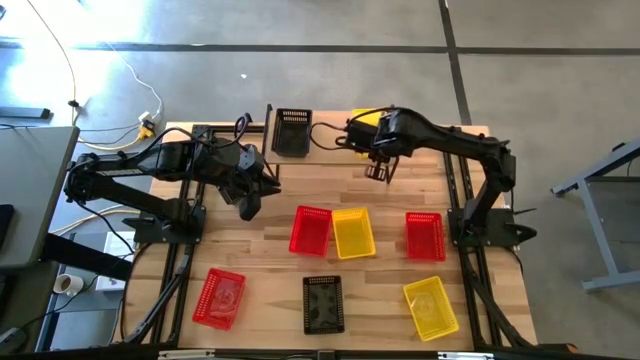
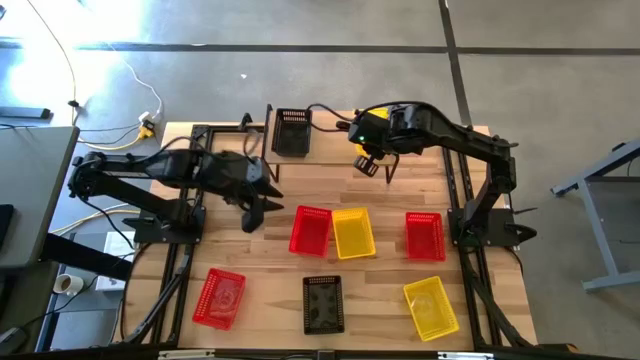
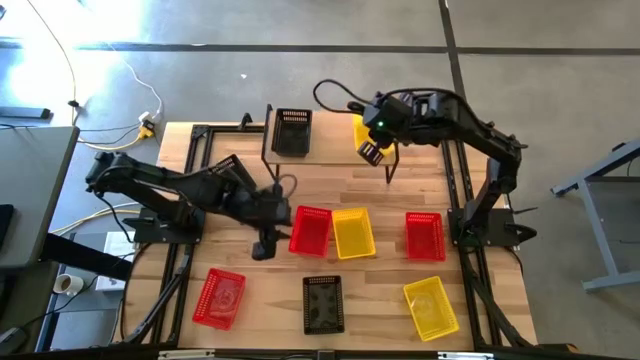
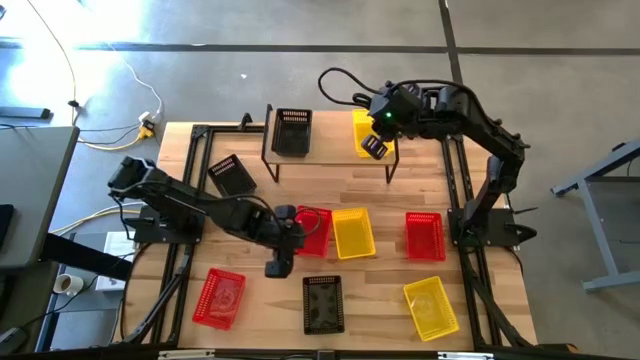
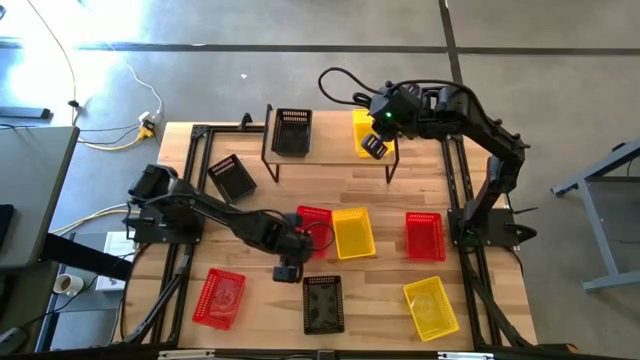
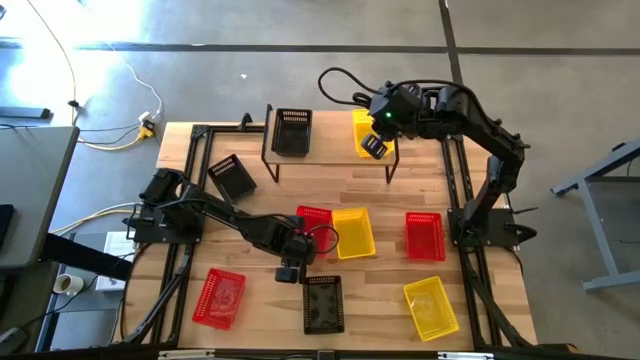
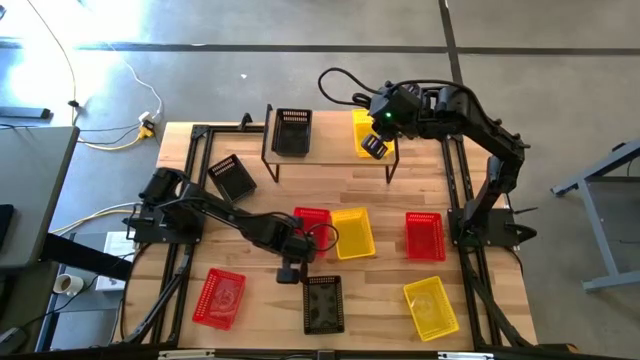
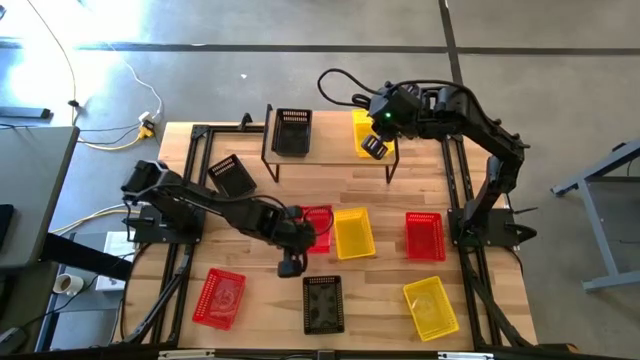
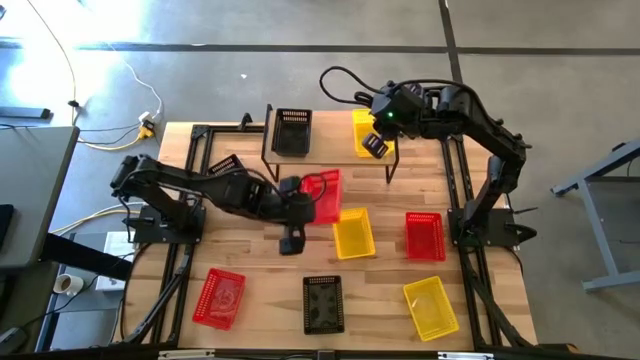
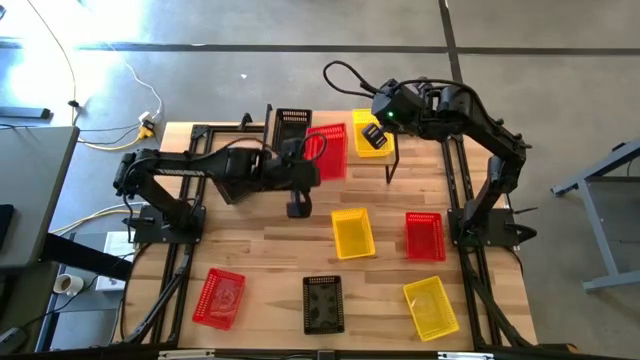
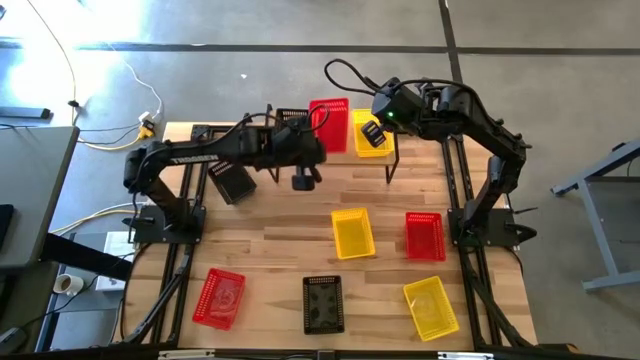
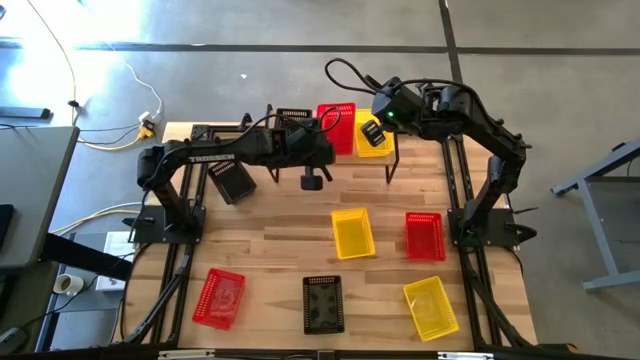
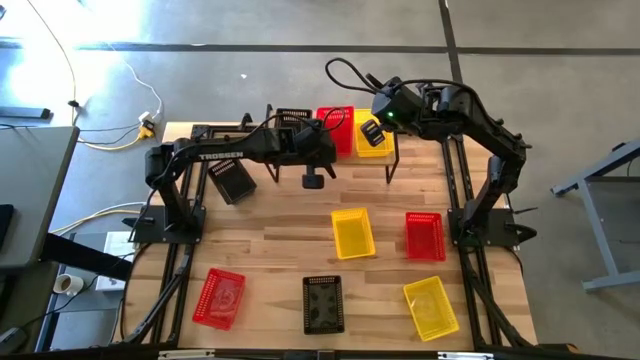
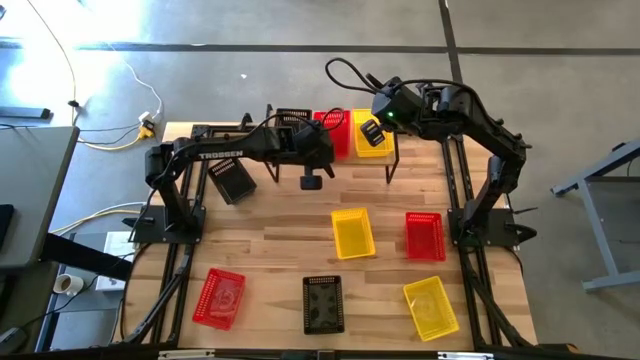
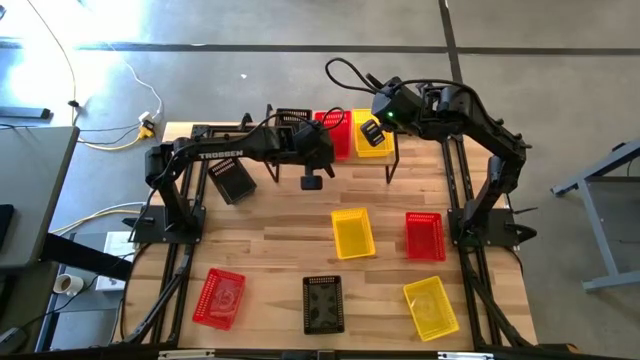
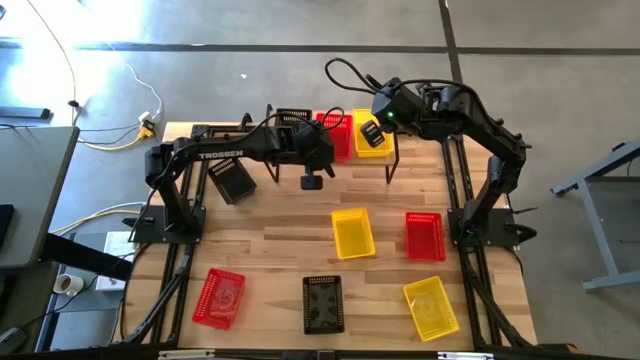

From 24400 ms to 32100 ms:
Task: Stack baskets on shelf by color
Put the middle red basket on the shelf

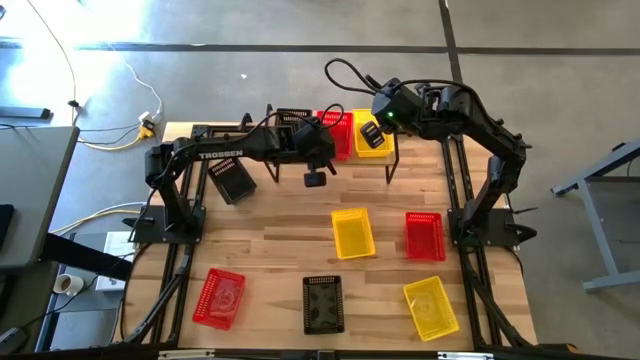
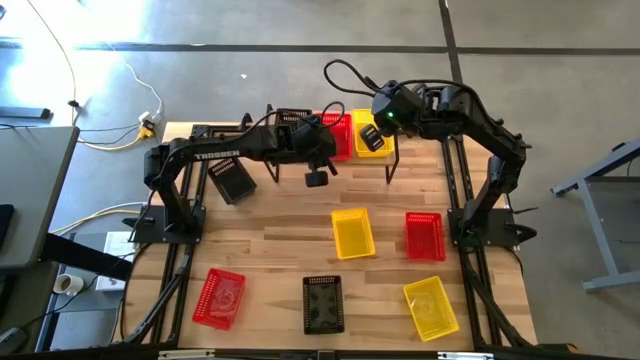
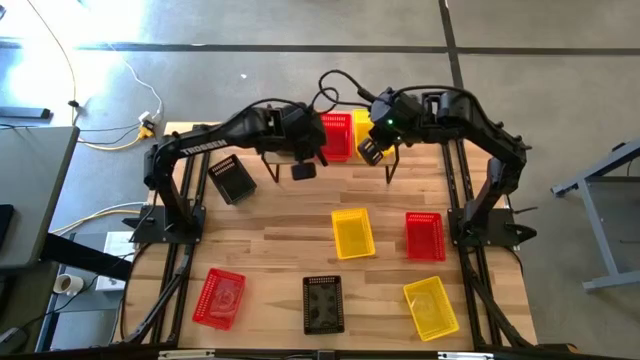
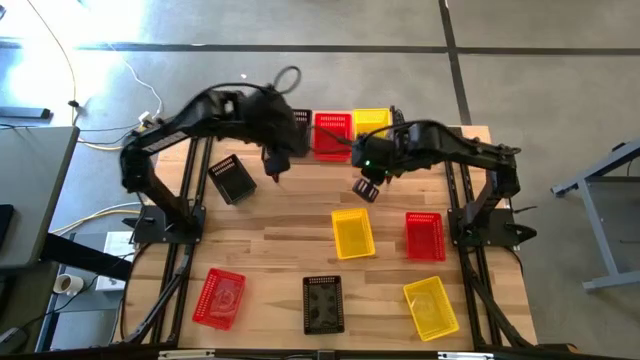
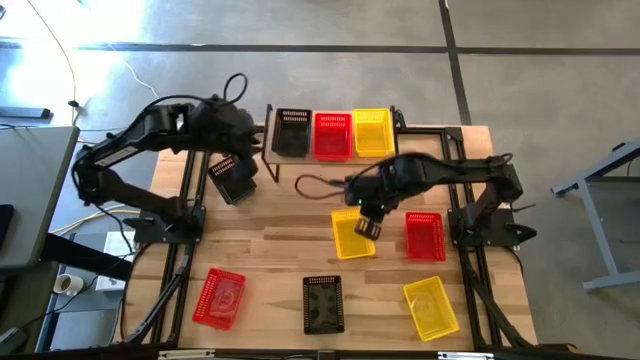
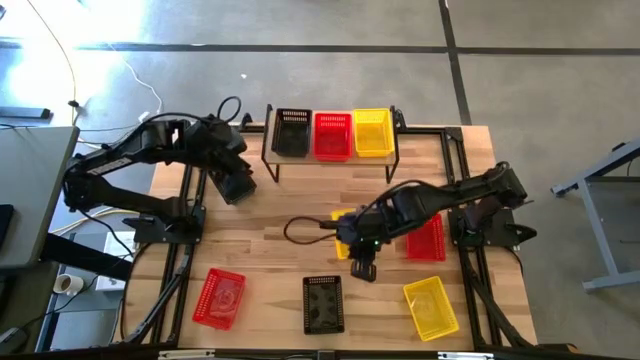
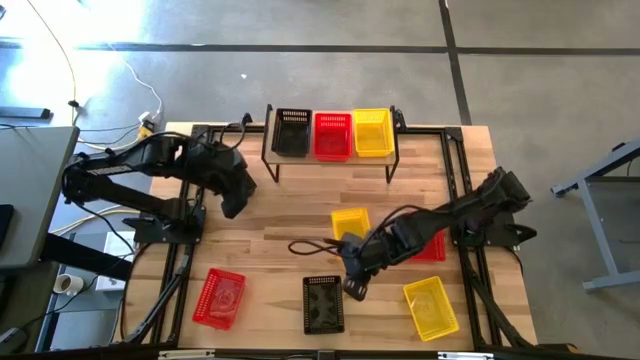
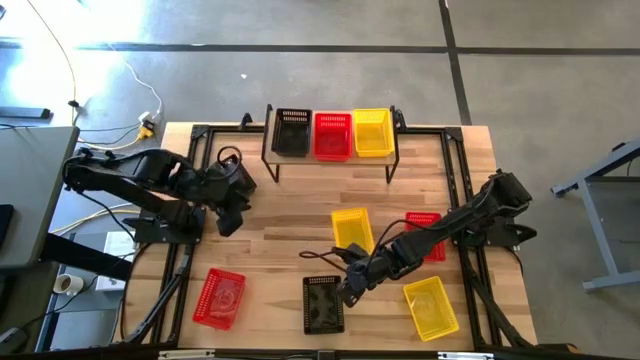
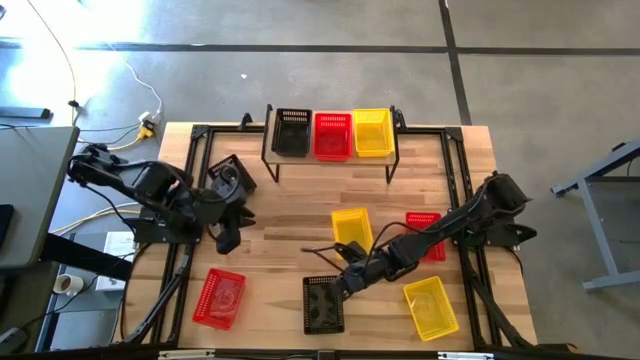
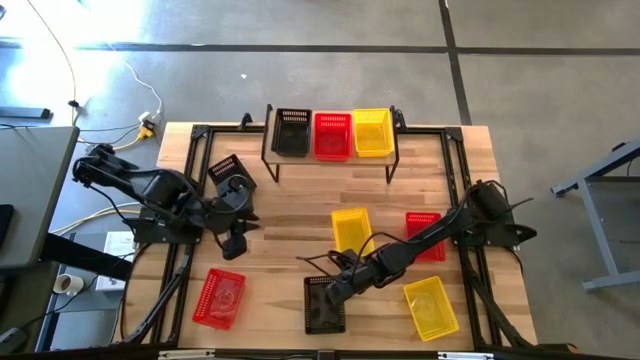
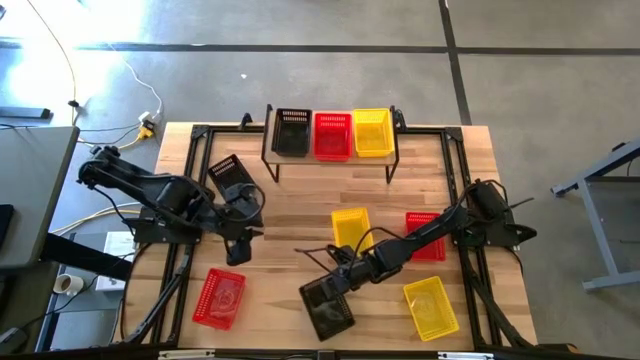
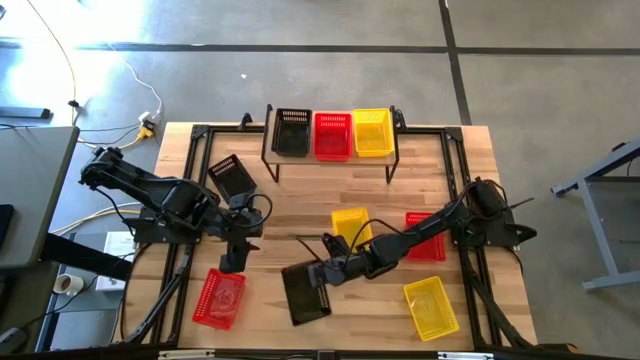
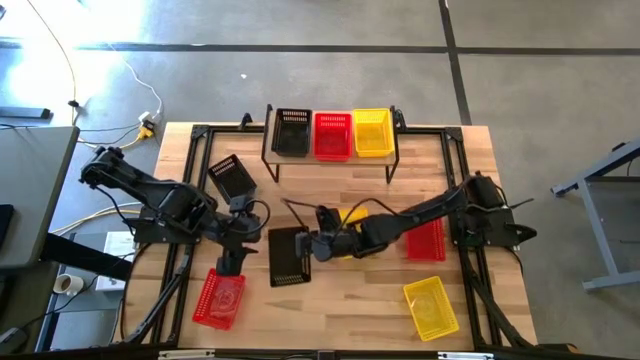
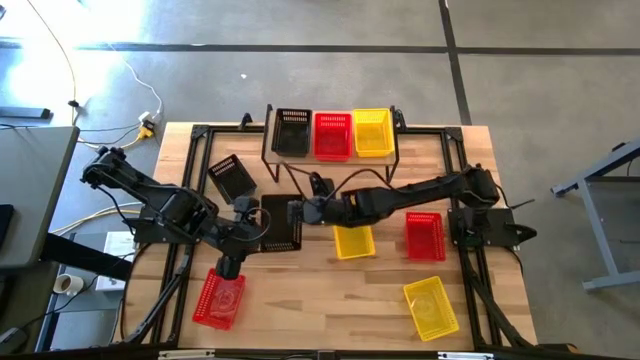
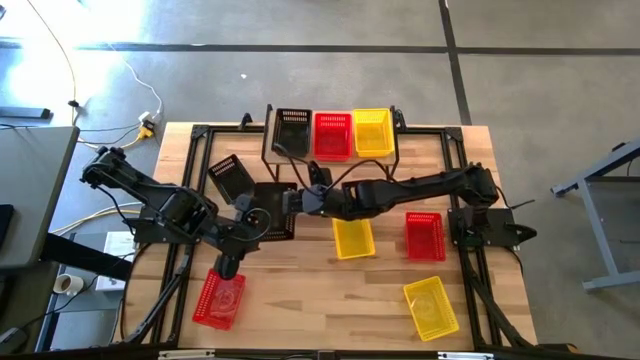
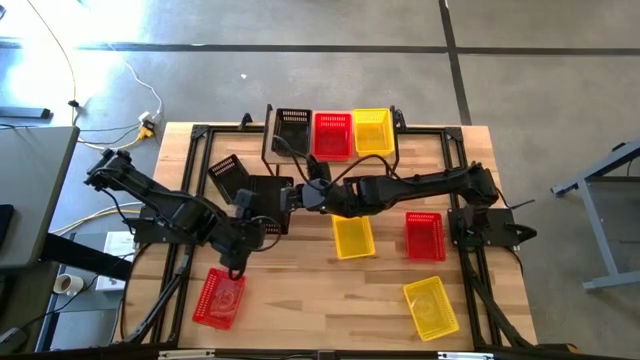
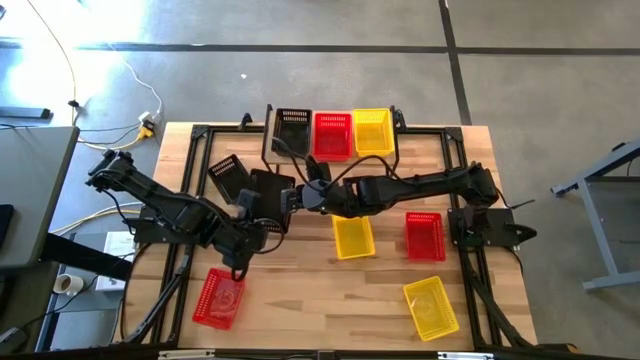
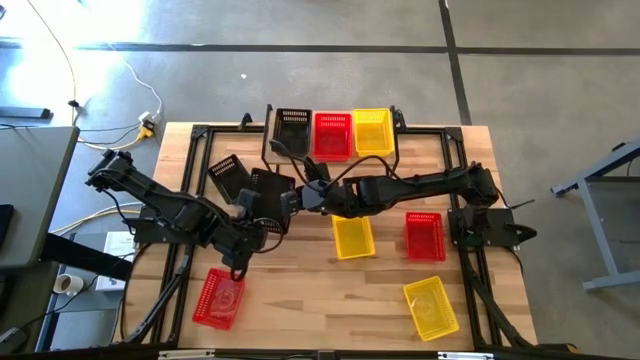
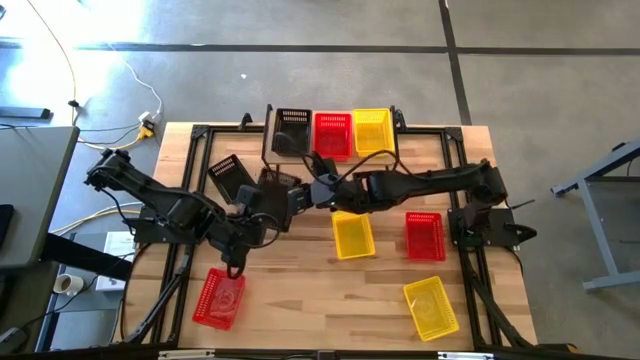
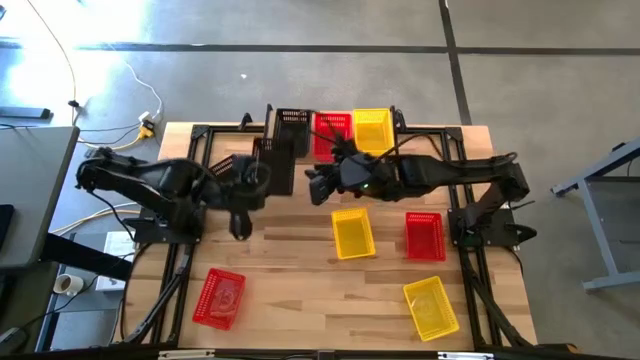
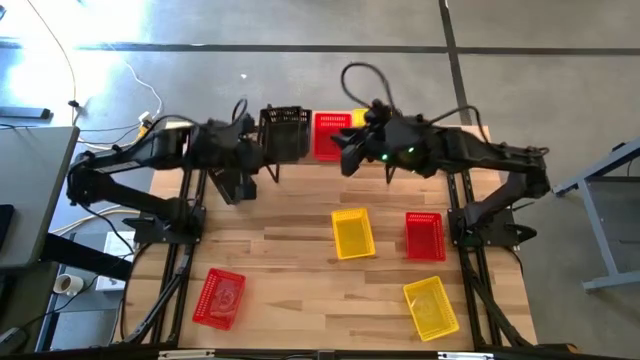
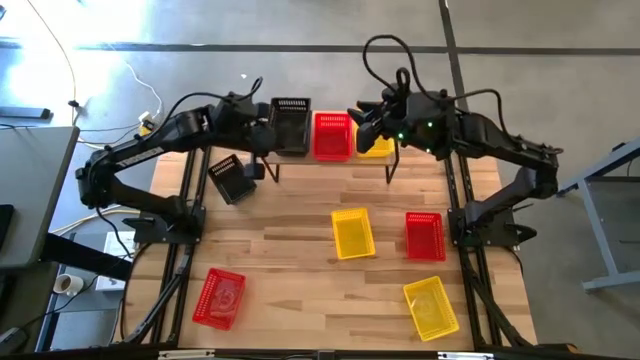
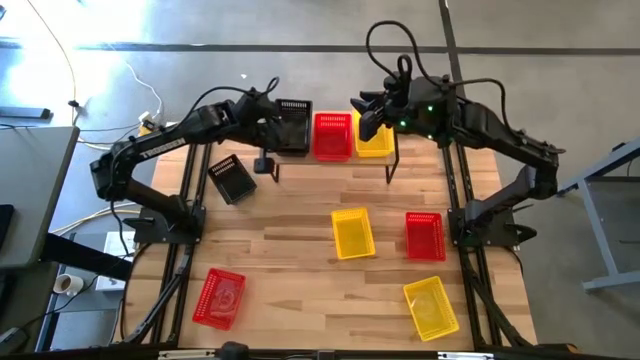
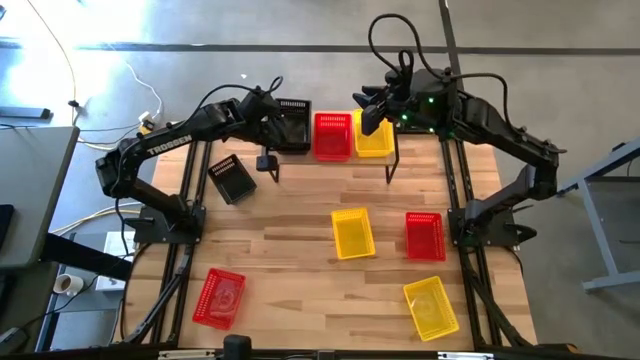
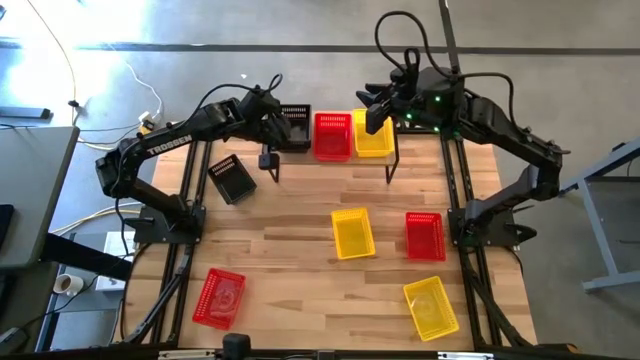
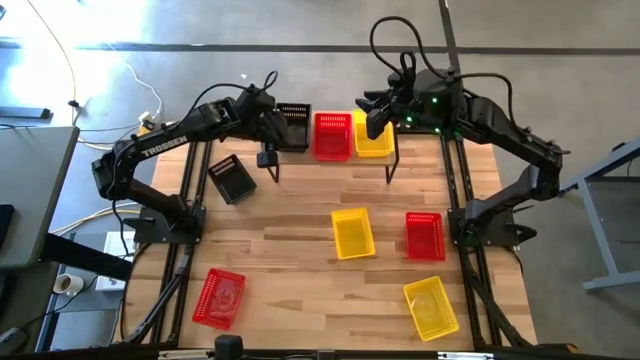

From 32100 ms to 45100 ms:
Stack the bottom black basket on top of the black basket on the shelf

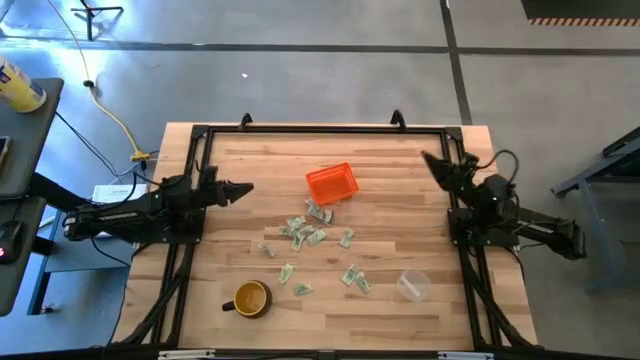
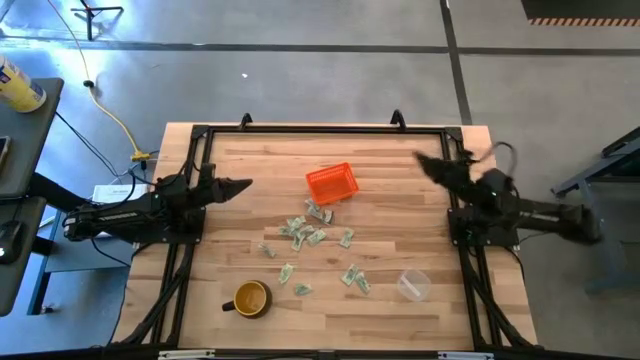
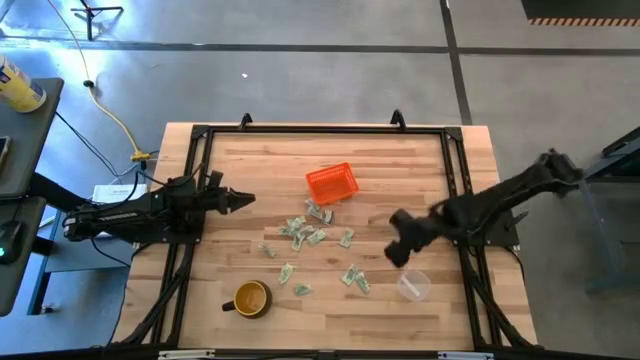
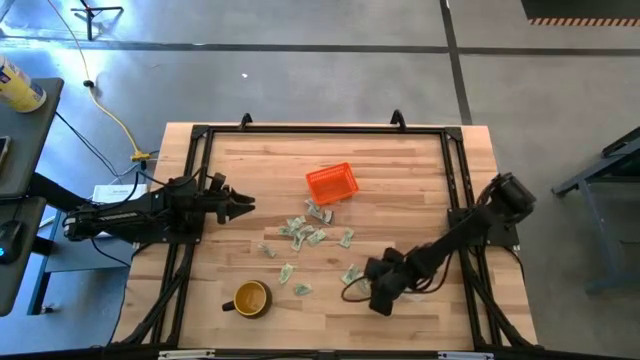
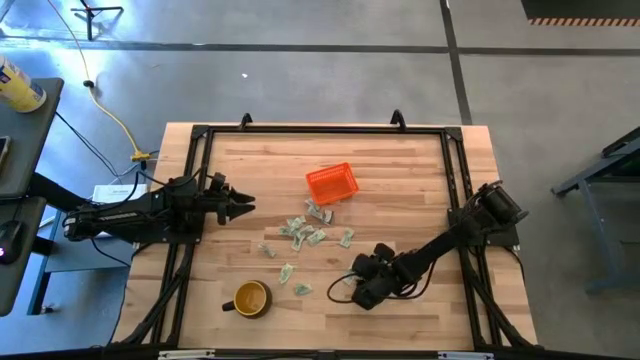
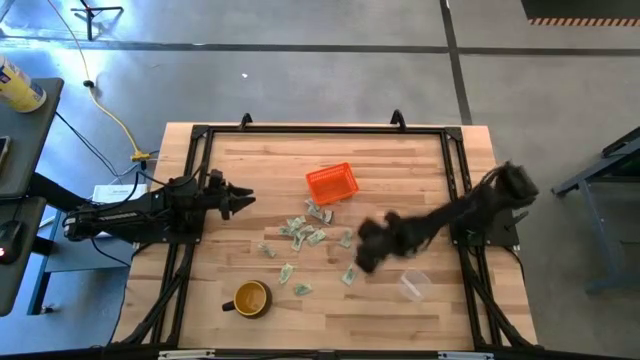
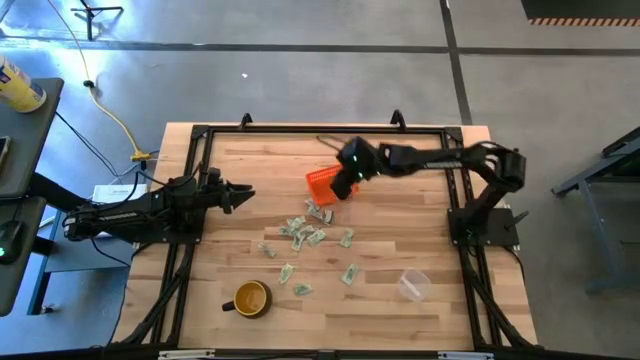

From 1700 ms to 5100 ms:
Task: Pick and place items into bin
Put the white stevia packet into the orange bin
